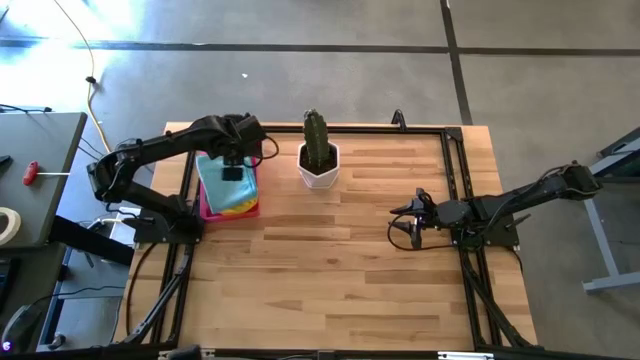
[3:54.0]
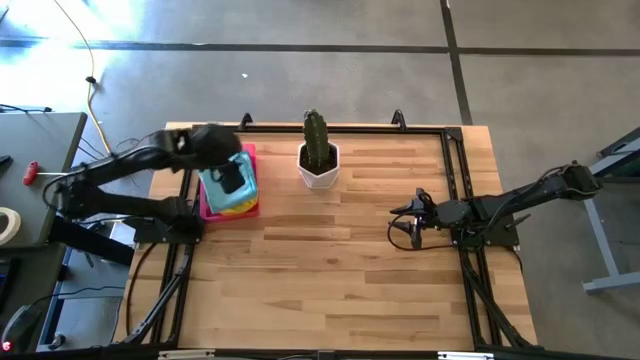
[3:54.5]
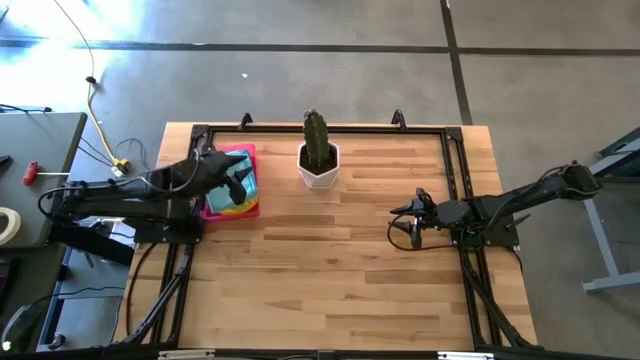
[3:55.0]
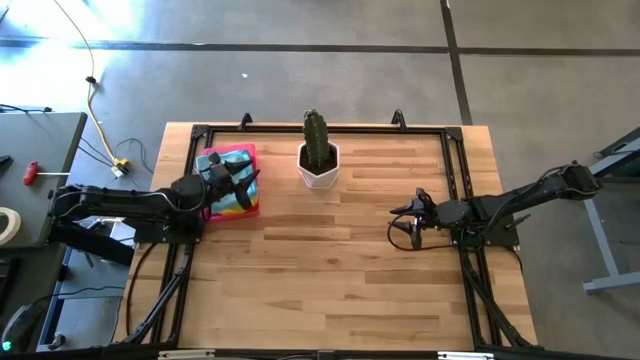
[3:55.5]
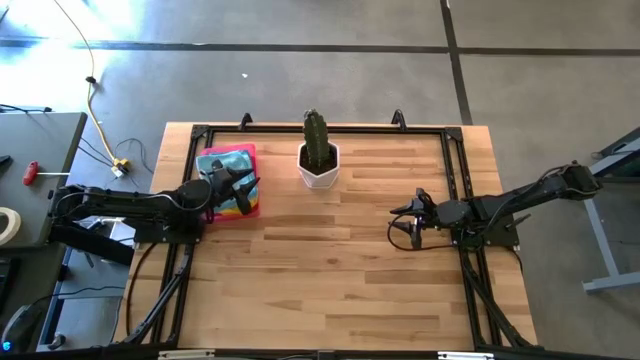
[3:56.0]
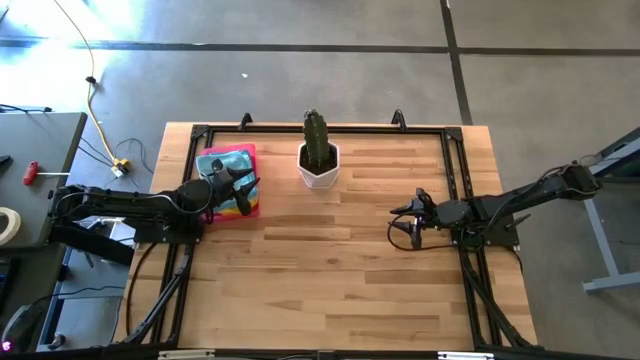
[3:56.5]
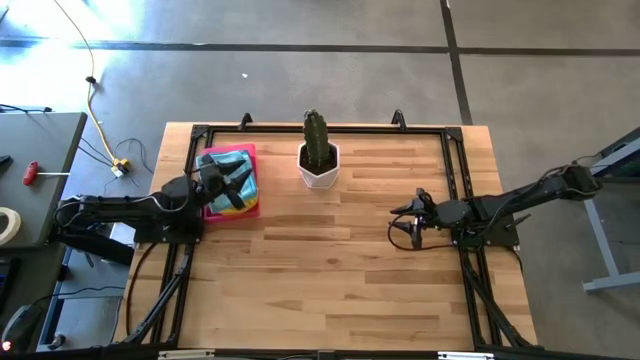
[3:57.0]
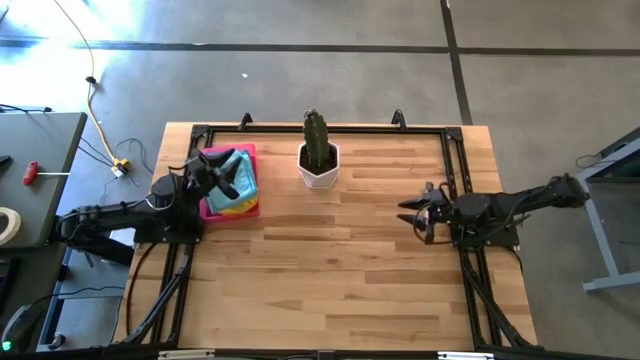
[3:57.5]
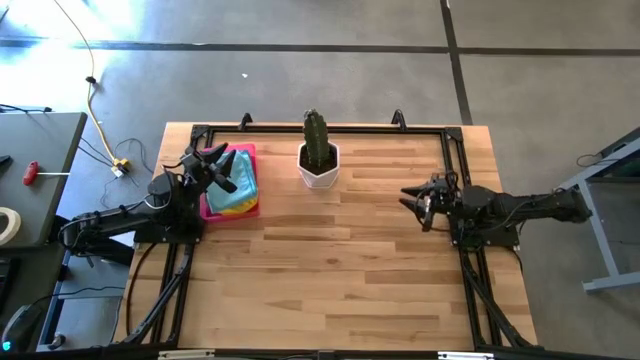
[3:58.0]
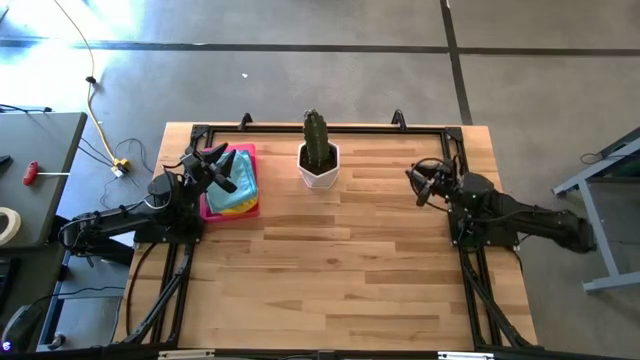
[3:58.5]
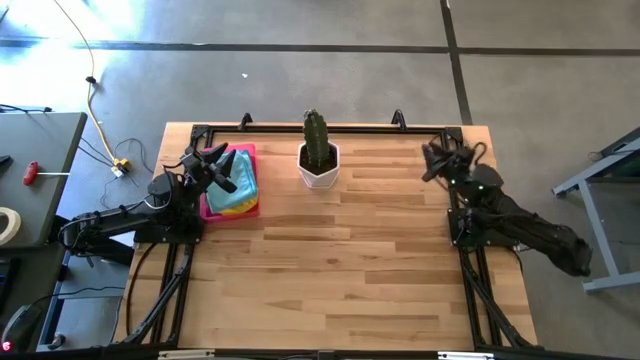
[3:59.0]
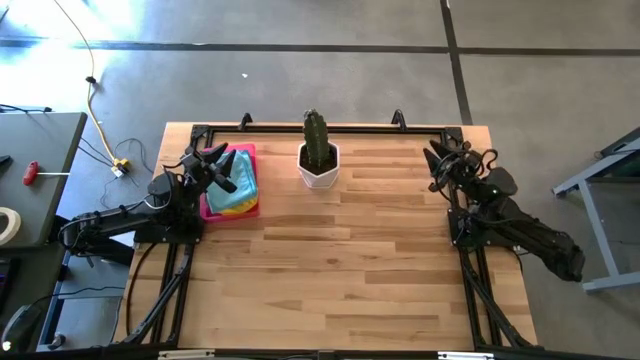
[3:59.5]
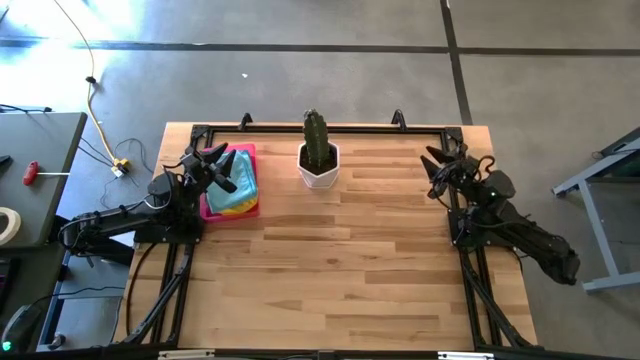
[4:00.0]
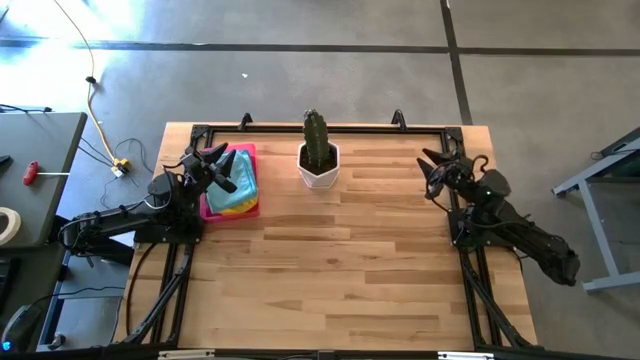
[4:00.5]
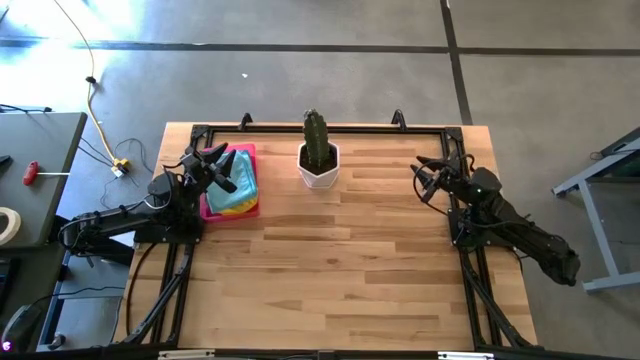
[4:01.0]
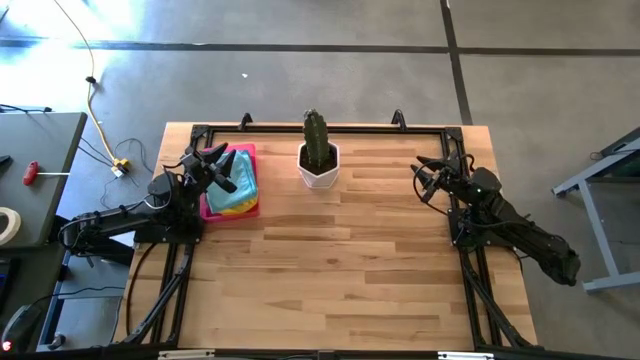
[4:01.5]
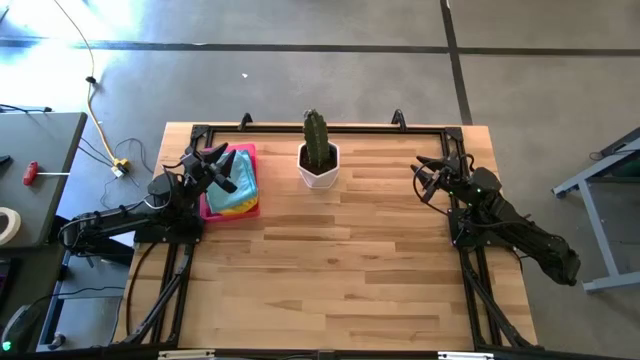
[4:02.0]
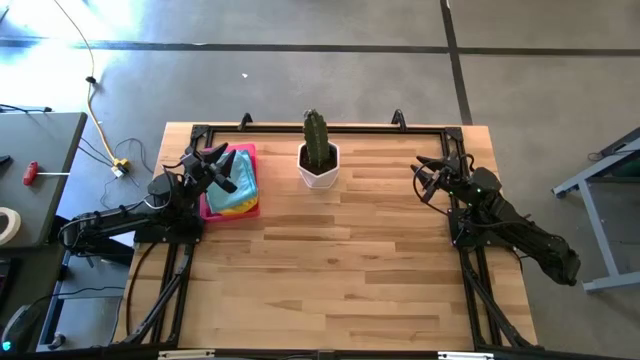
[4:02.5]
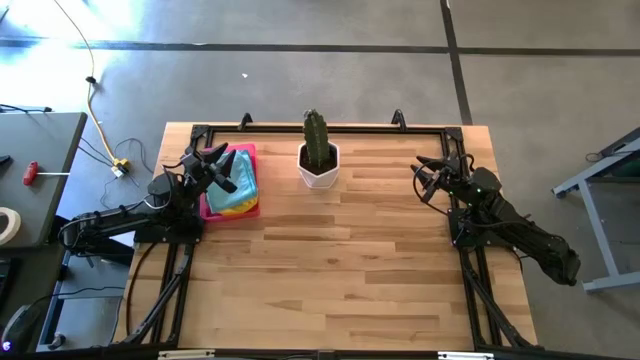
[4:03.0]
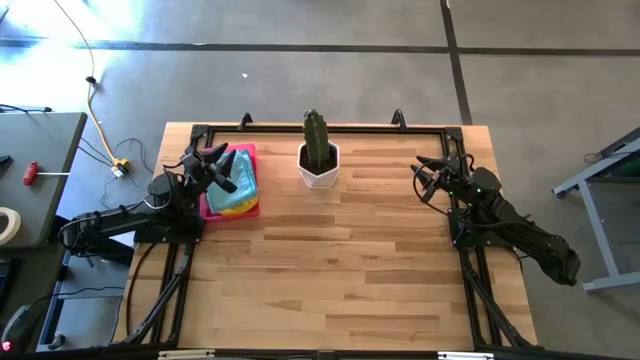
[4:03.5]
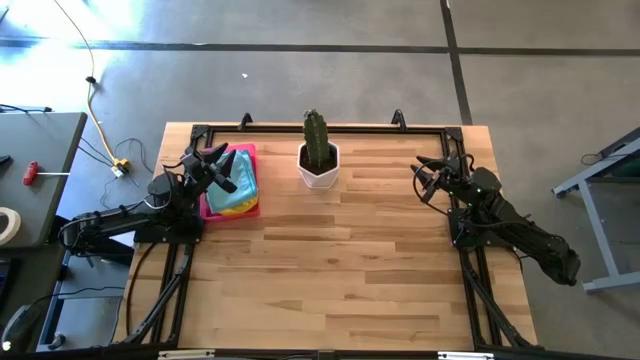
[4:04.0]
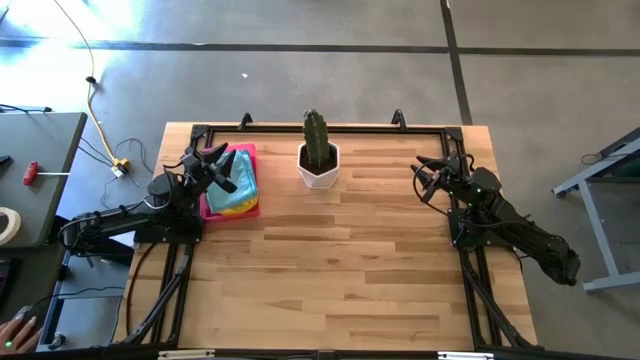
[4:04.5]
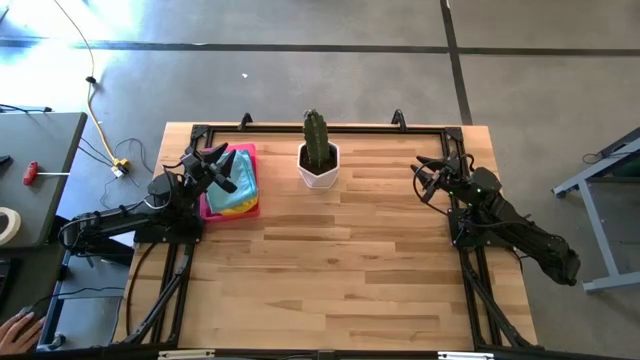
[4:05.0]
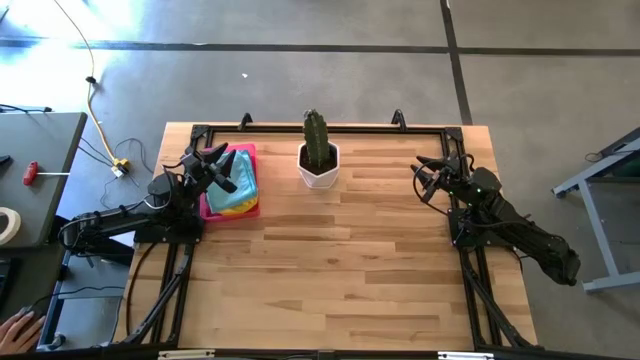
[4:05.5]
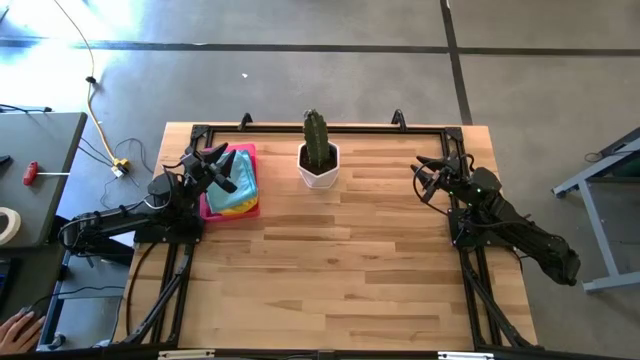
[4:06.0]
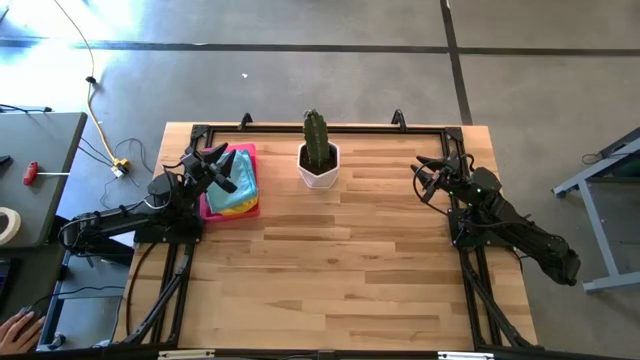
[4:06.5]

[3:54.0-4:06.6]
Task: Fold microfiber towels
Return to Home Position

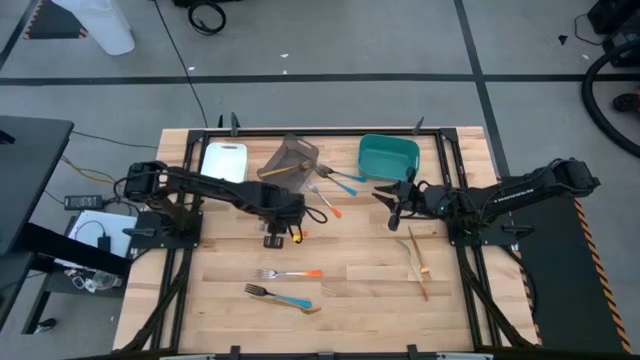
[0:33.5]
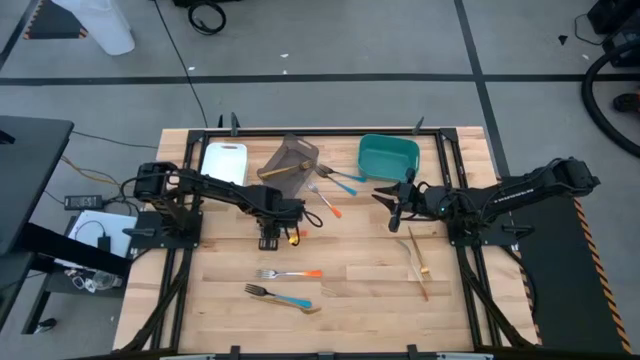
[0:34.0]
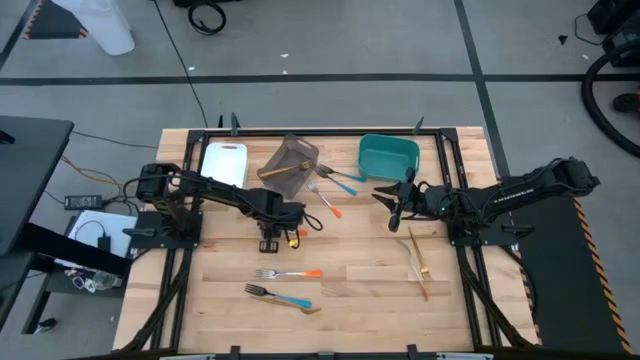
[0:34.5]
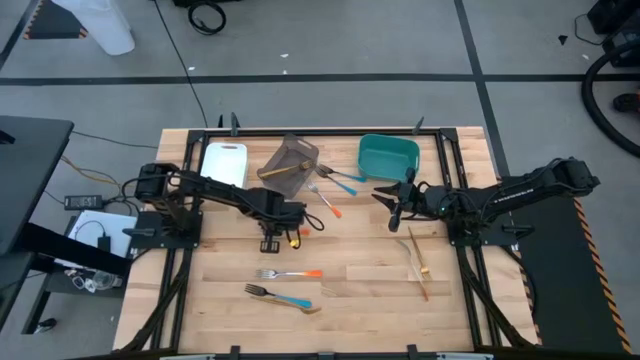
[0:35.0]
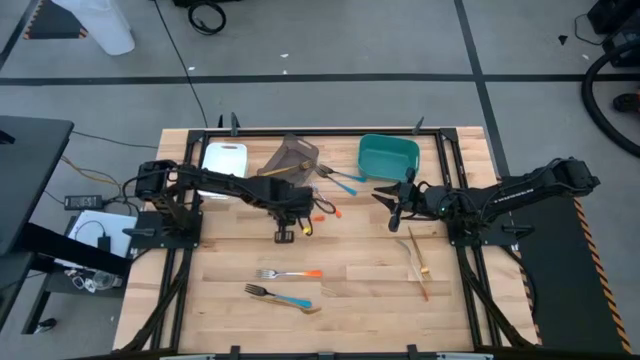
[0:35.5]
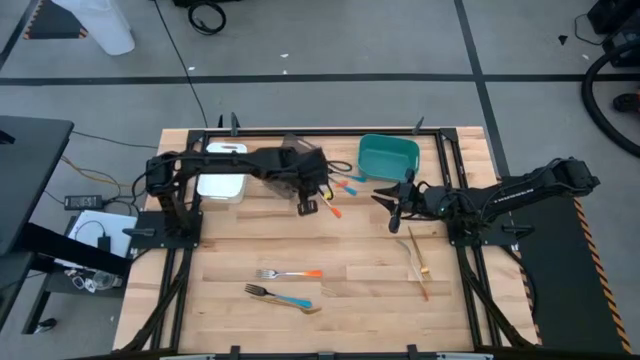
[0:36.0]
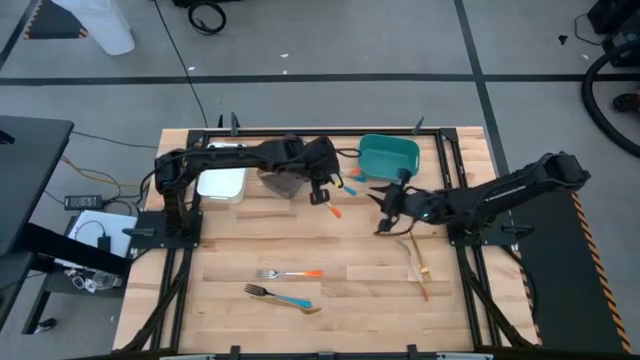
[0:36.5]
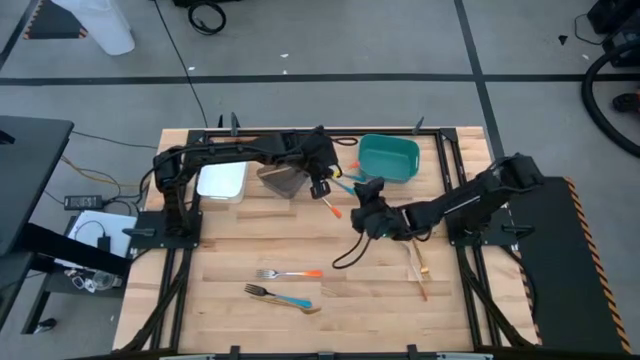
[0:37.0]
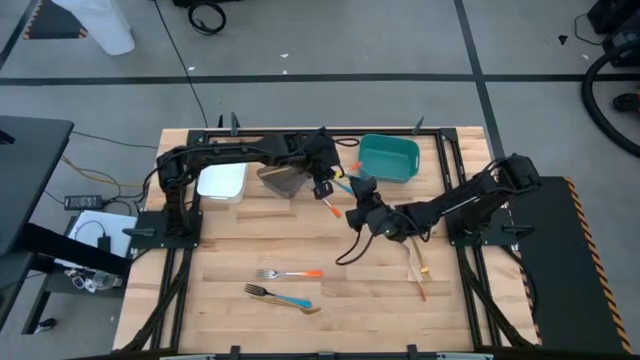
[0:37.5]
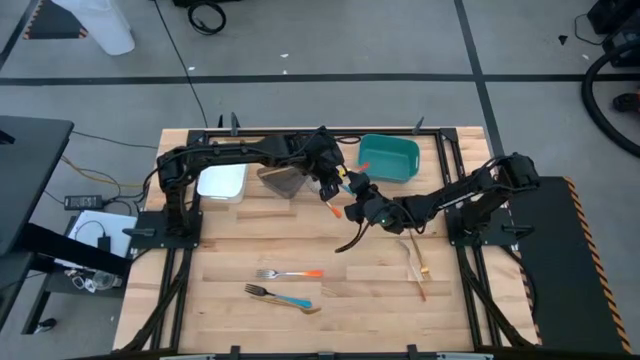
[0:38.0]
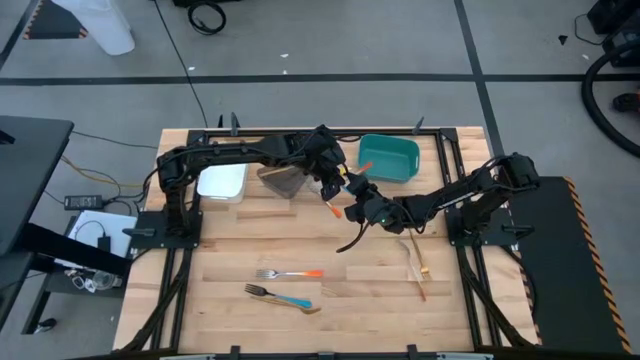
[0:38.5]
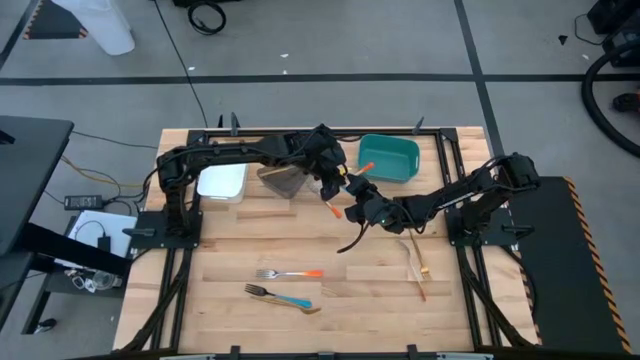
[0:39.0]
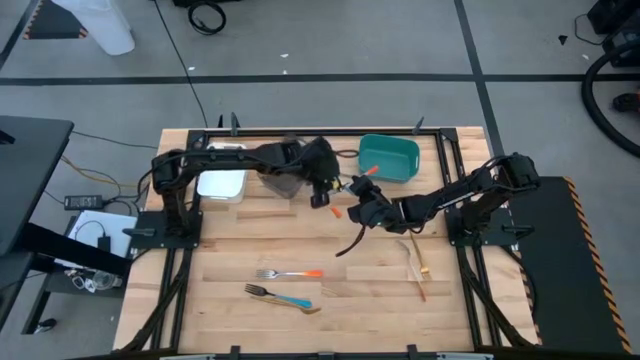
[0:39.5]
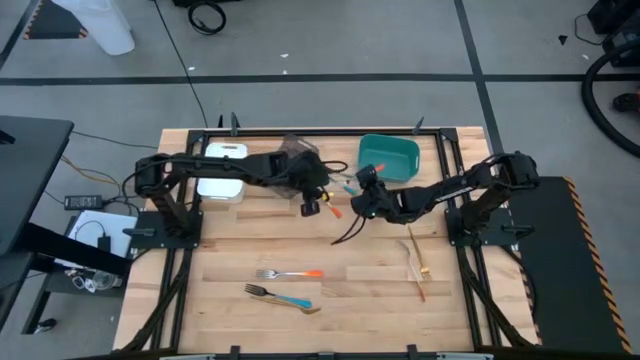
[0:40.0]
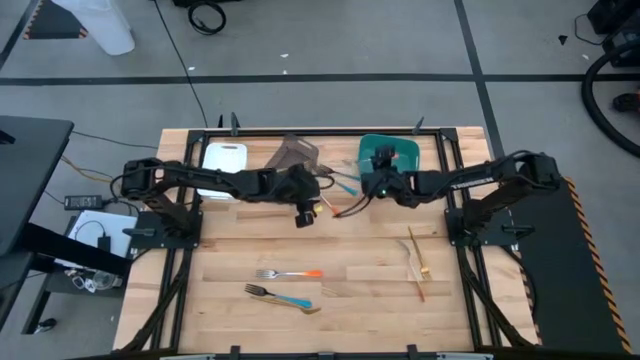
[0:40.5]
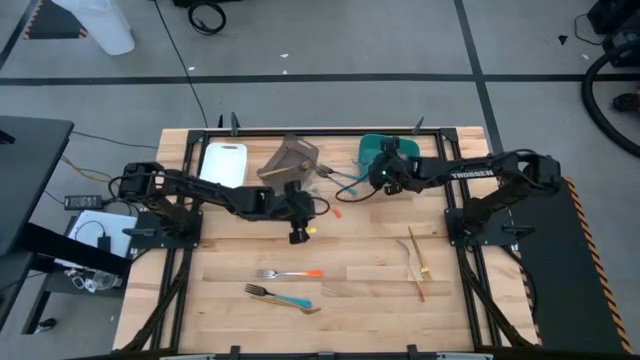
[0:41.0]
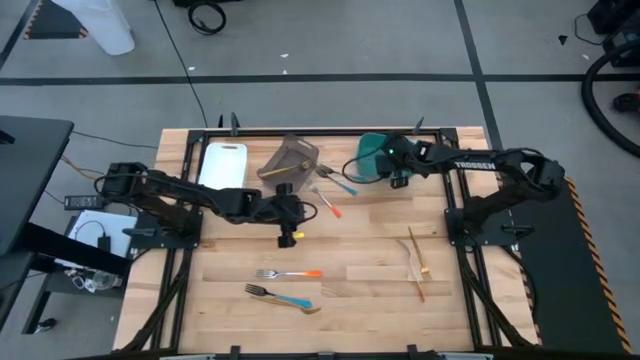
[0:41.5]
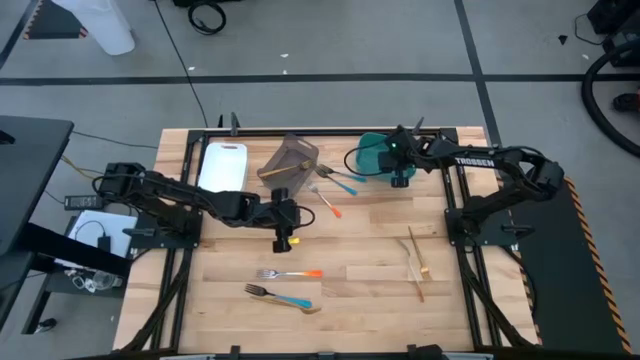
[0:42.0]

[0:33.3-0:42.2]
Task: Sort silverware by color (type)
Put the center orange fork into the green bin
